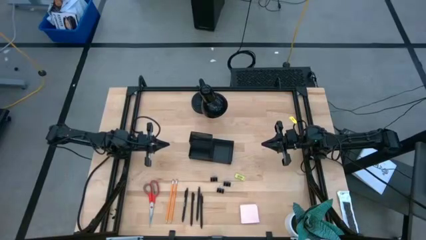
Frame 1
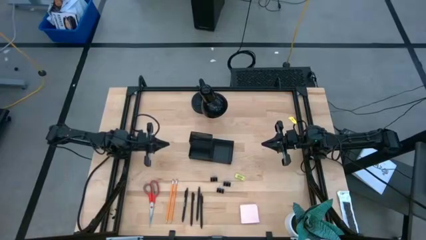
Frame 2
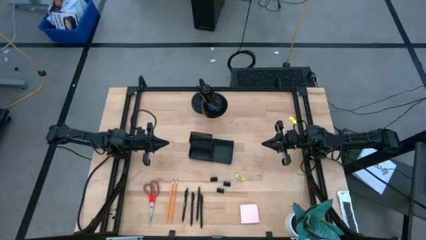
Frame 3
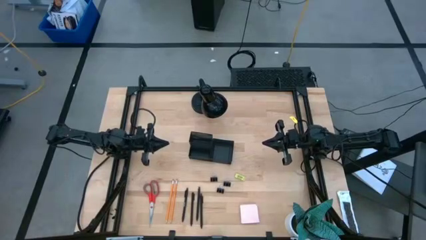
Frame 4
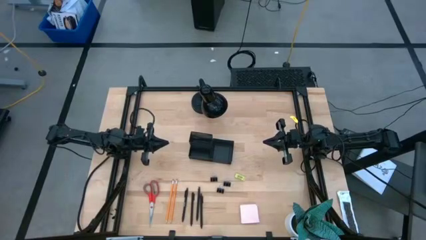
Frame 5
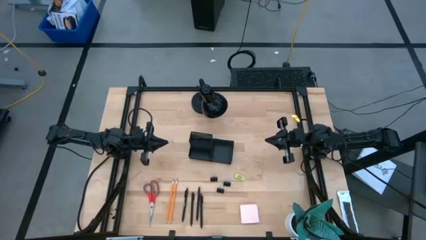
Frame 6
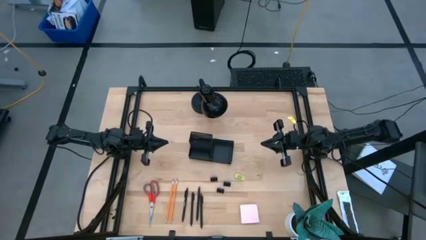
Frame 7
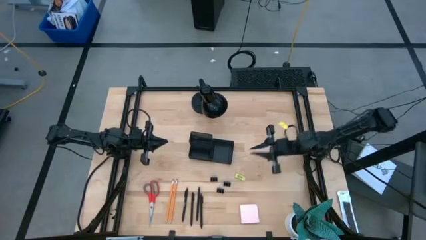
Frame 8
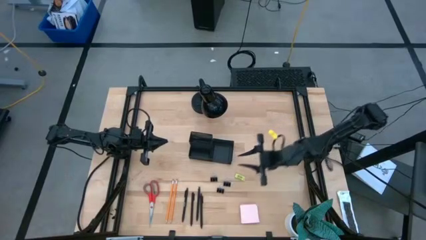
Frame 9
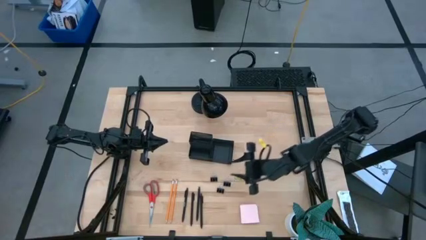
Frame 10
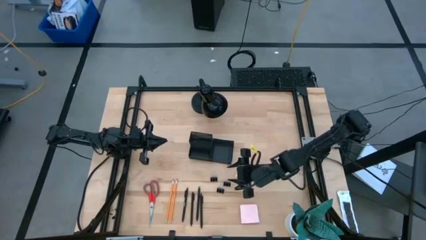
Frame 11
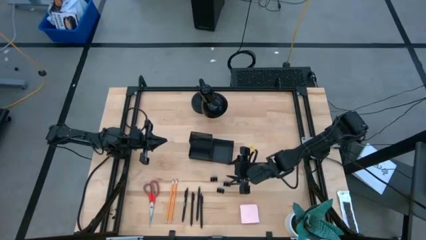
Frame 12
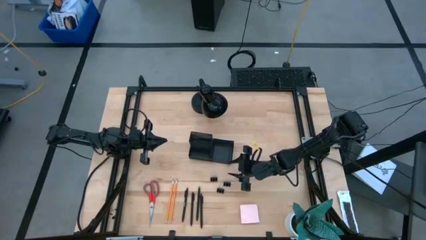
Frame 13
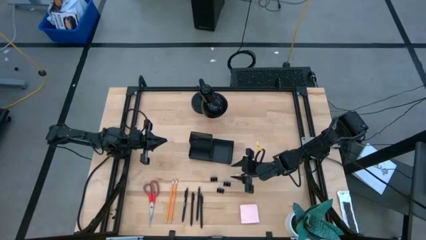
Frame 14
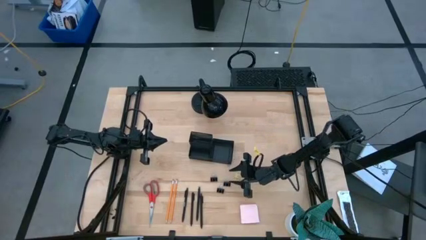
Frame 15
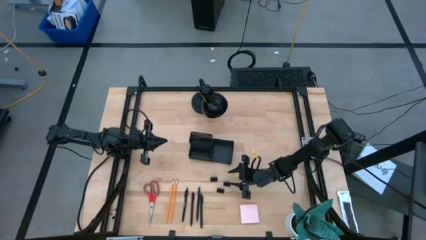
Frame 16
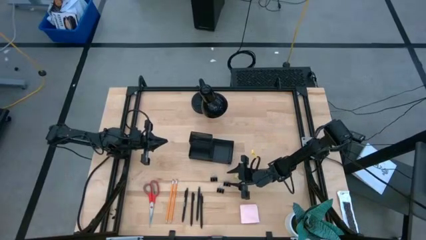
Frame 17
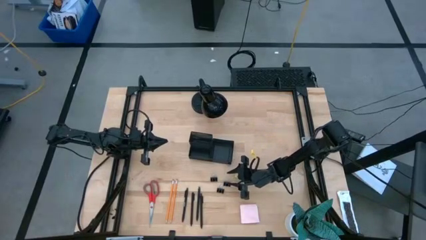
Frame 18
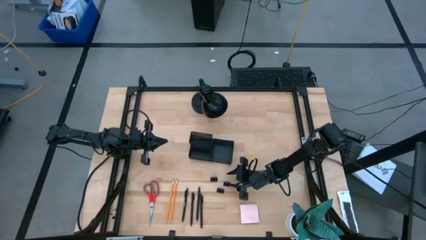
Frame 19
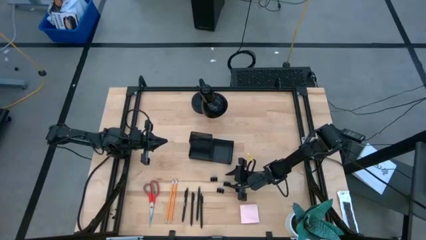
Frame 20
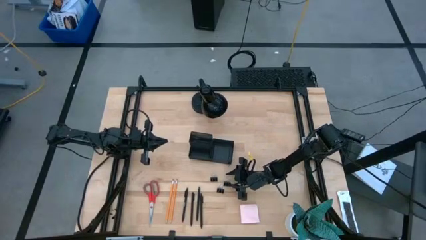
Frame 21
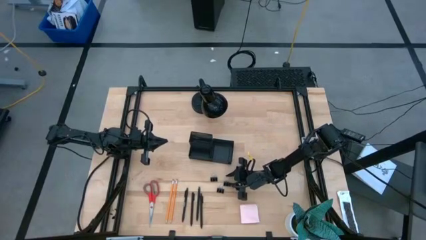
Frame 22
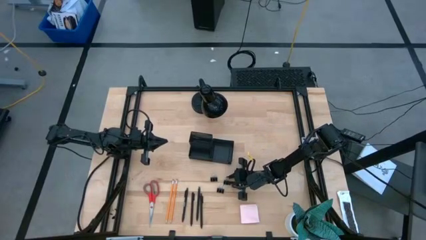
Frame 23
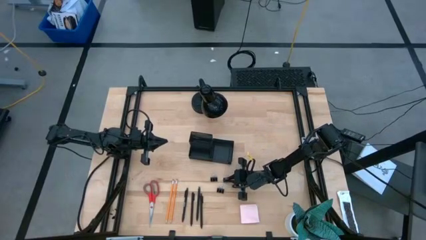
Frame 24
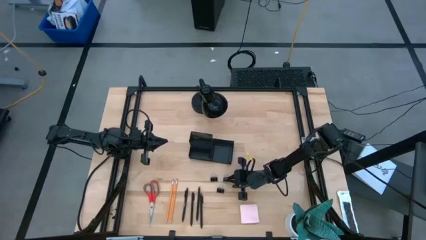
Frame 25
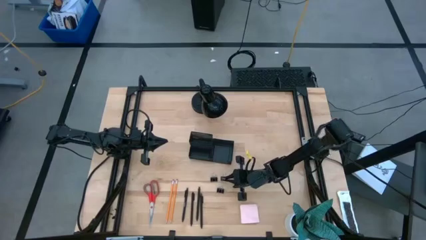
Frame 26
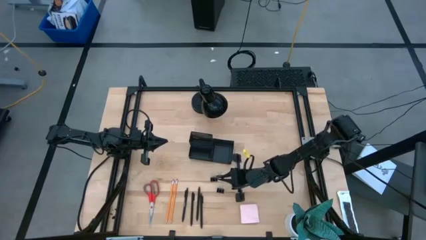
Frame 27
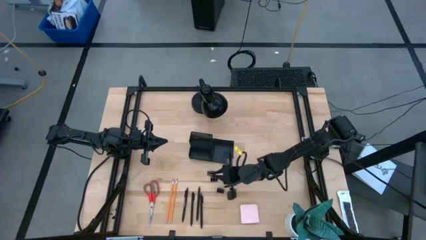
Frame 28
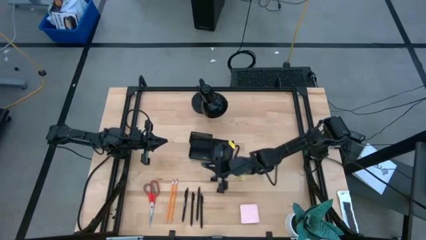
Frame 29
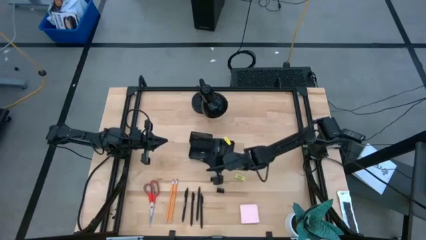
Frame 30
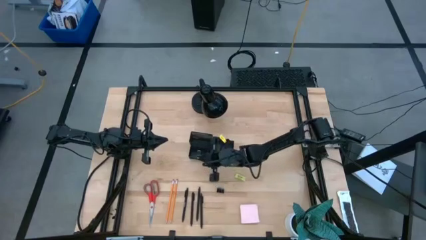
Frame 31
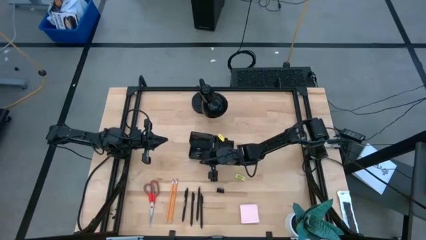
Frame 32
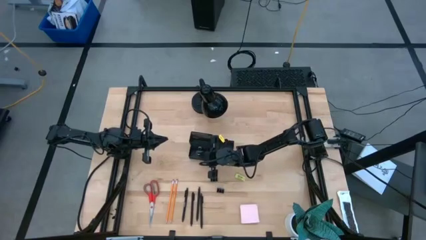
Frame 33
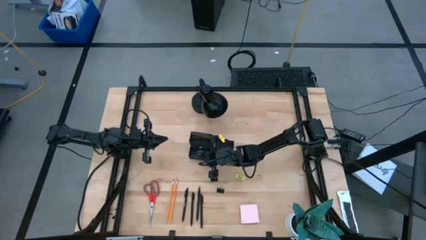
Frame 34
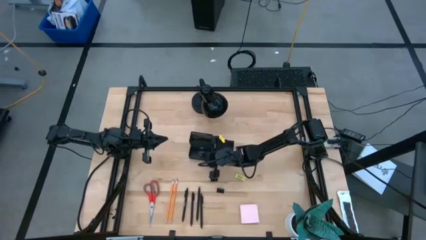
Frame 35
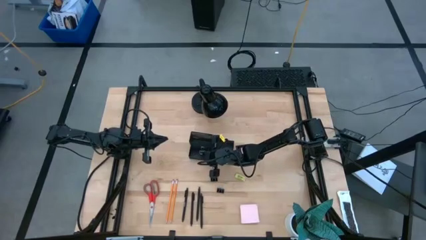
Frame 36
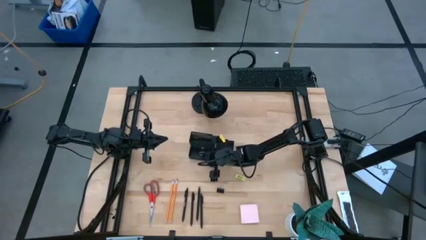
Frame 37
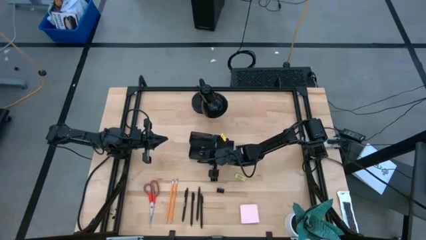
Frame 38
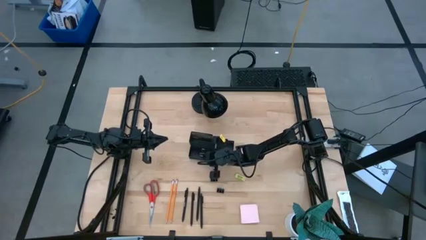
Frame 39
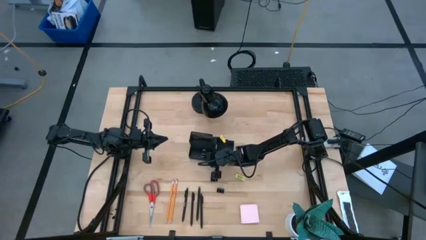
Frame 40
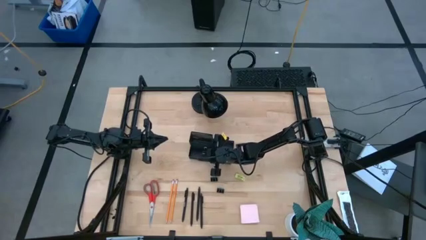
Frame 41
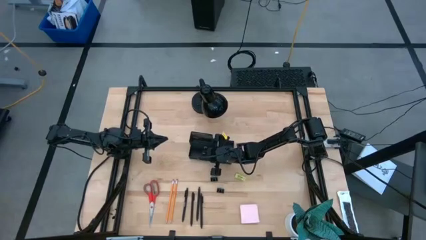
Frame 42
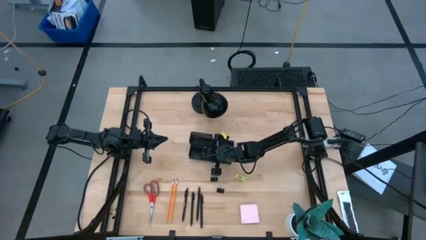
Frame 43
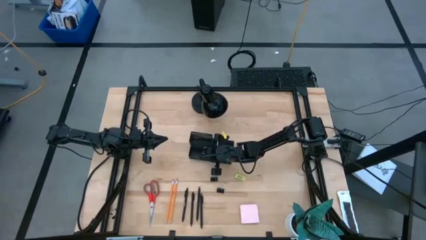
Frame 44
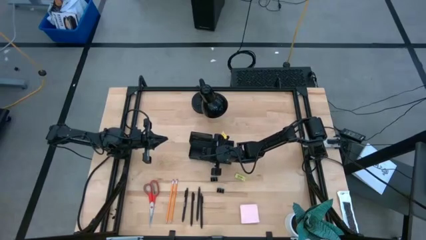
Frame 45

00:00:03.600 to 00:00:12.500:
Task: Pick and place office supplies into organizer
Put the black binder clip into the black desk organizer

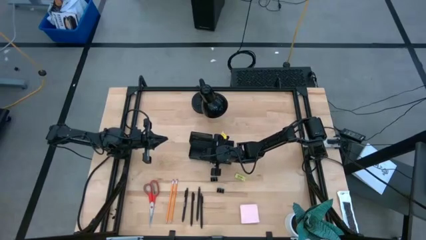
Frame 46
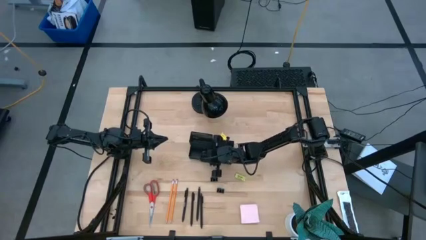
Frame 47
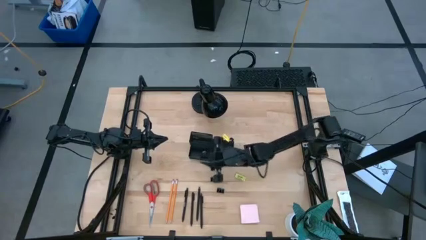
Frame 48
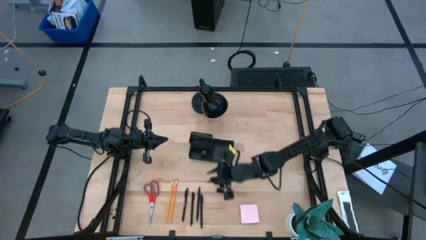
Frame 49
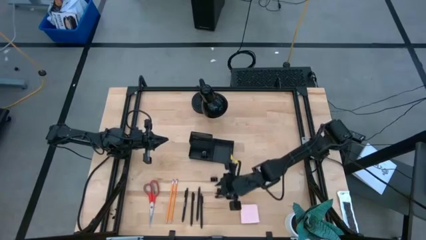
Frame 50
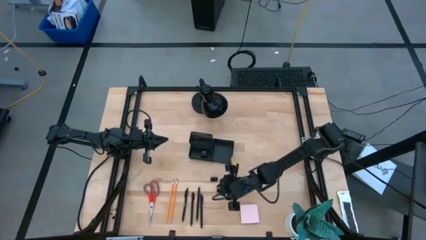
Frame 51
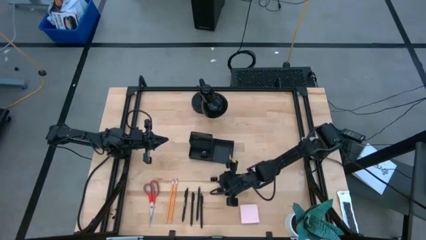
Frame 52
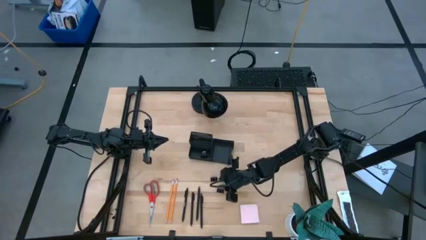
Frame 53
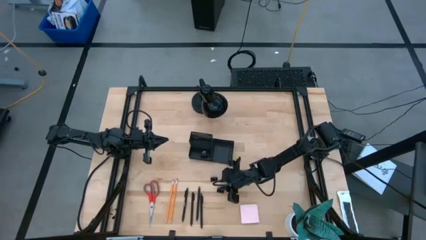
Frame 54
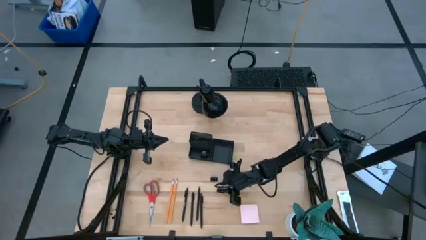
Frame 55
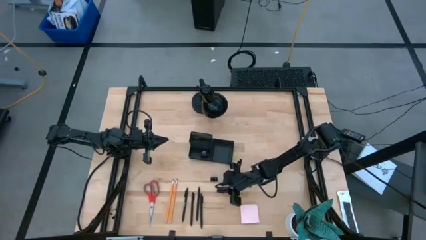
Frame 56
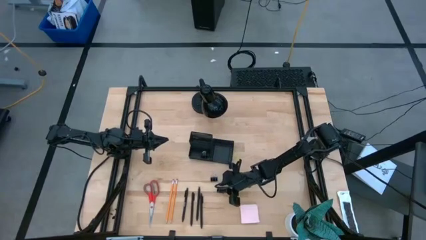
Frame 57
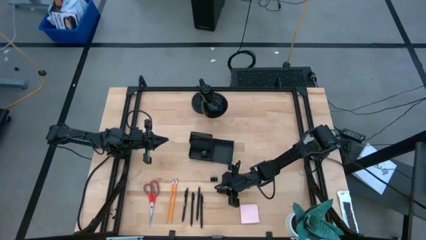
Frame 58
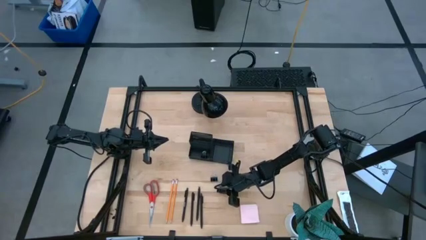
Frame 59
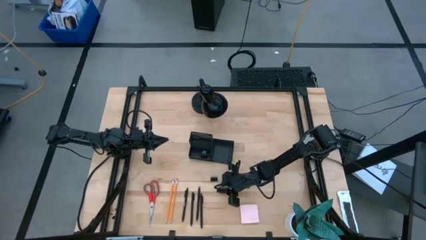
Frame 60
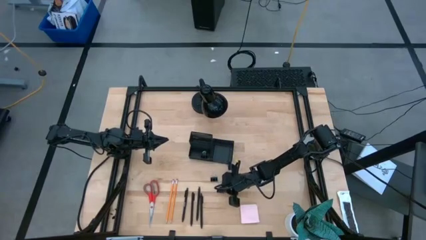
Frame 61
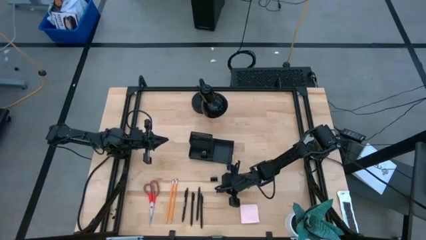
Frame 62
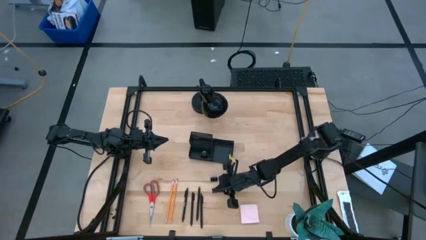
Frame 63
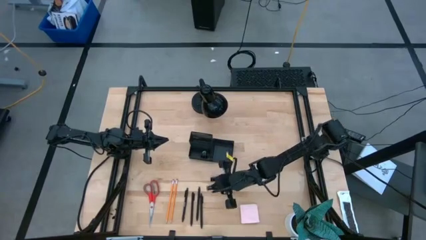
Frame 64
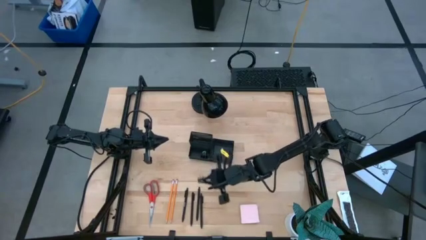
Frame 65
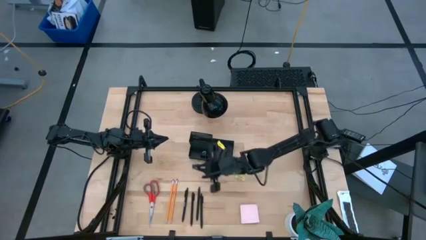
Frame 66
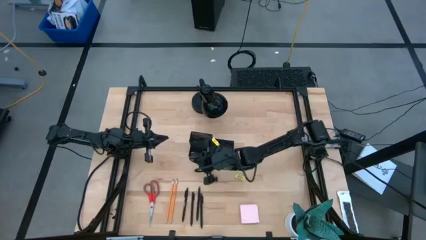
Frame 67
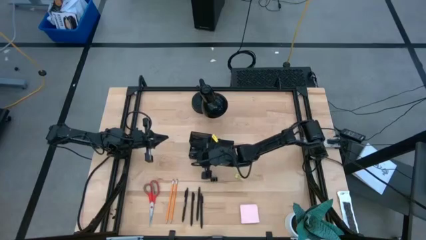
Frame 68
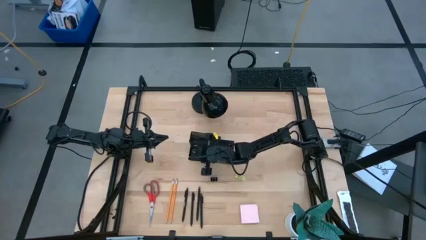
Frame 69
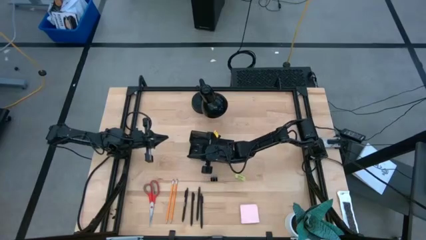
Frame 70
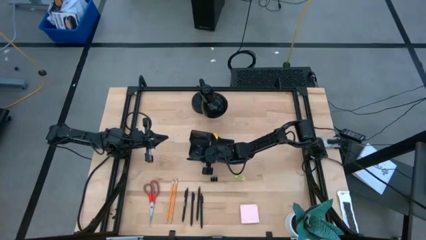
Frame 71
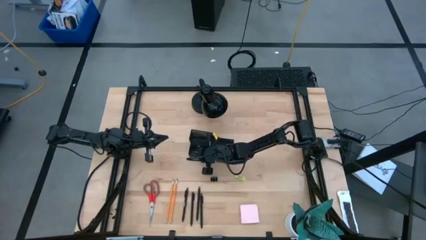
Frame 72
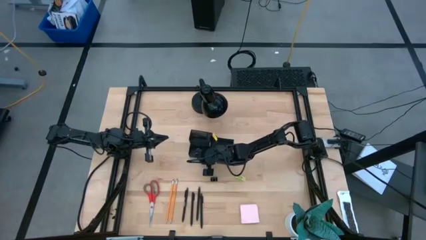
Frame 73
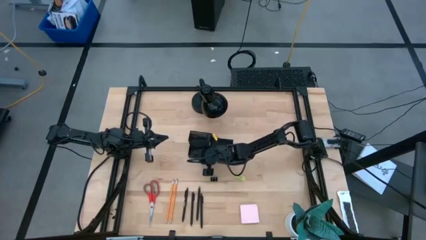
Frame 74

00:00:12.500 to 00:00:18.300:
Put the black binder clip into the black desk organizer

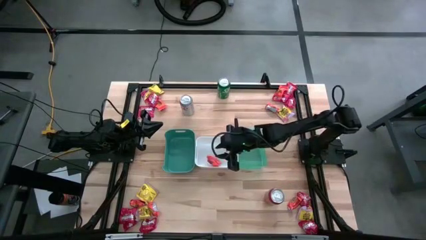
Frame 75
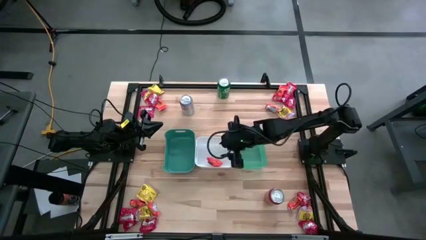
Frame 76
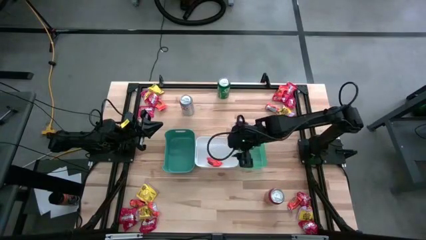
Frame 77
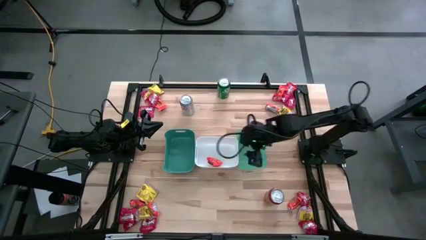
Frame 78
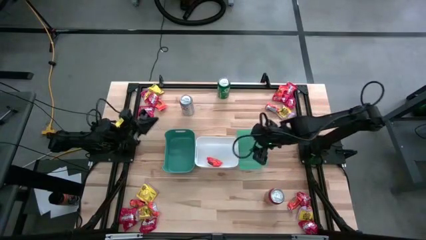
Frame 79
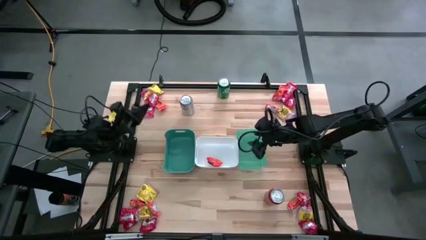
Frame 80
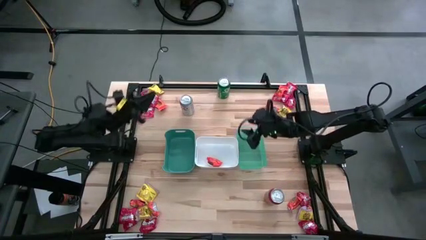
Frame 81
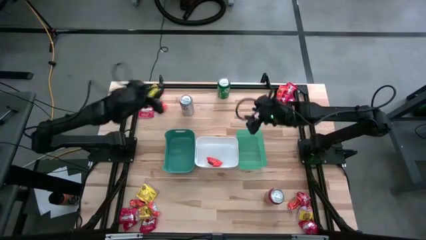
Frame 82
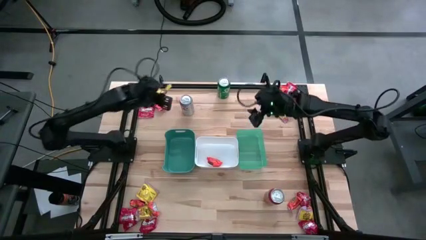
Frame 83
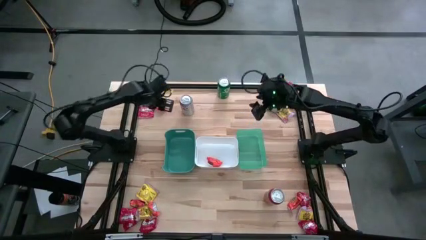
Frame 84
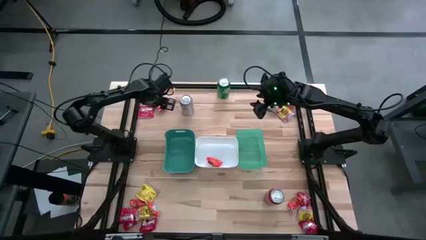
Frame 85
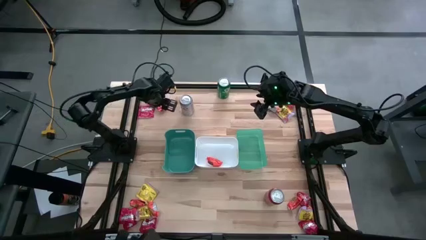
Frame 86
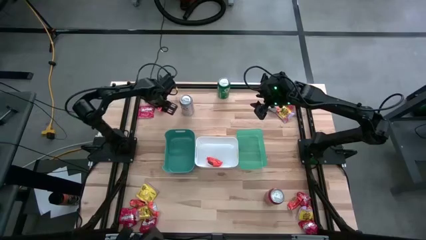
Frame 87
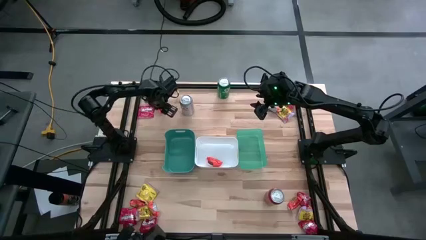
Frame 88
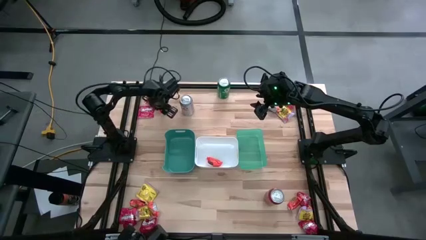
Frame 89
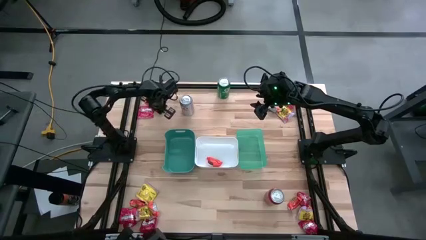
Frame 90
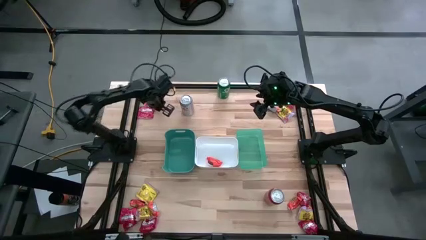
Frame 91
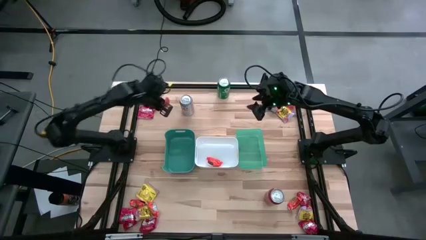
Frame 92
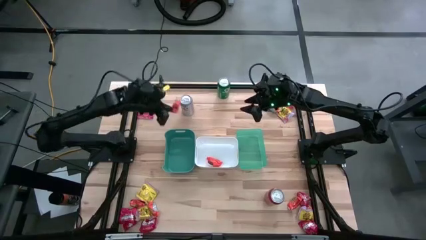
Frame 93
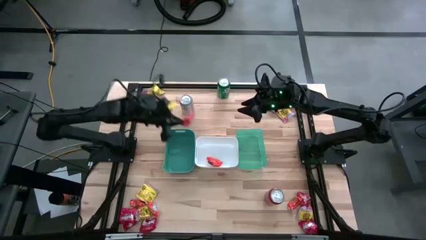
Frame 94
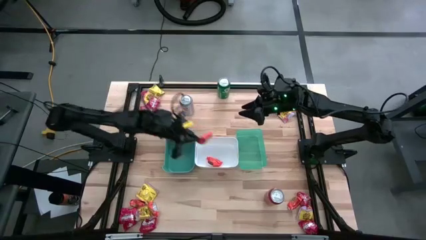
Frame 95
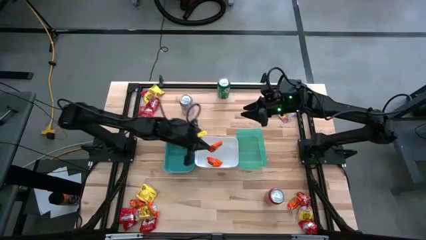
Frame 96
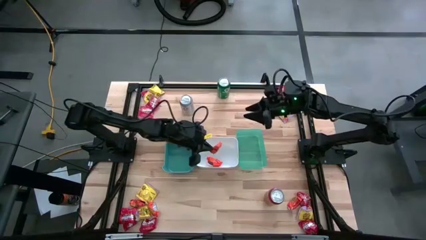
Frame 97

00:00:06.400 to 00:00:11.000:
Task: Sort candy
Put the orange chocolate into the white bin
